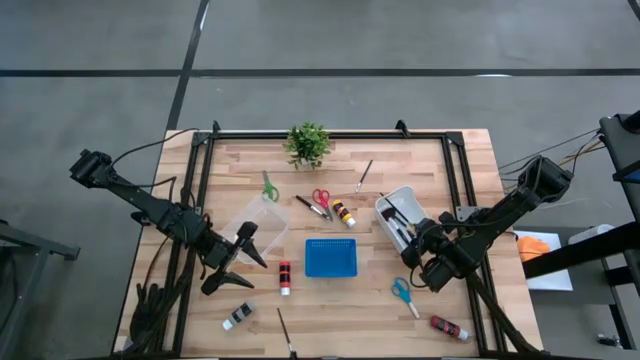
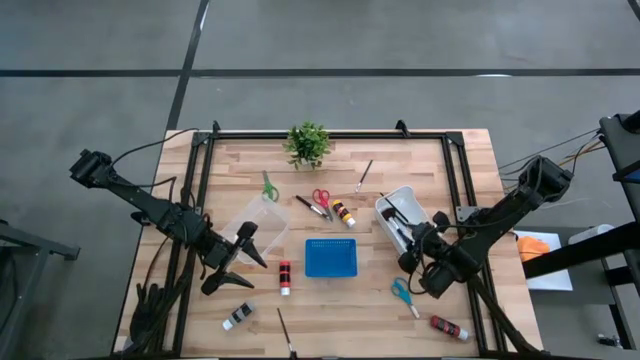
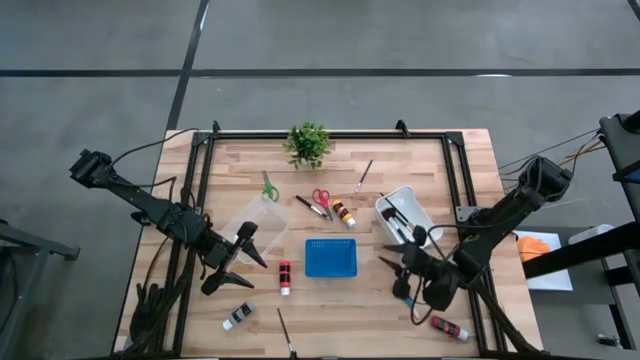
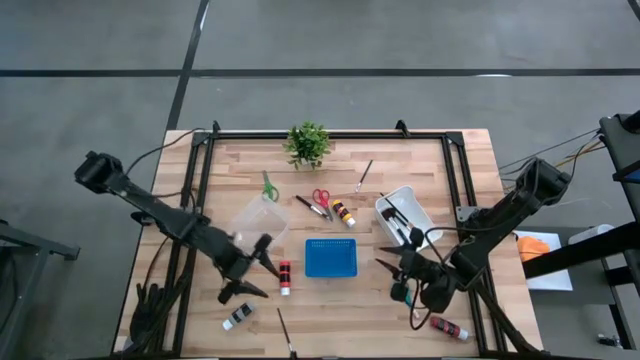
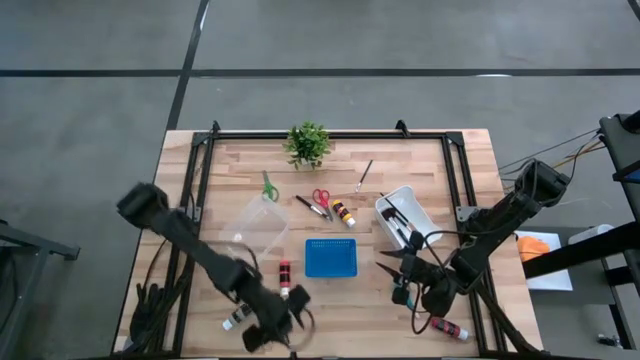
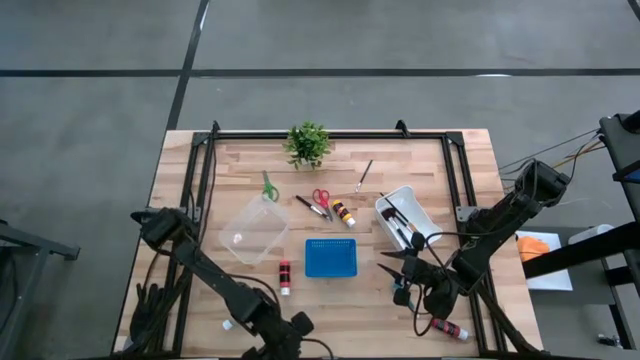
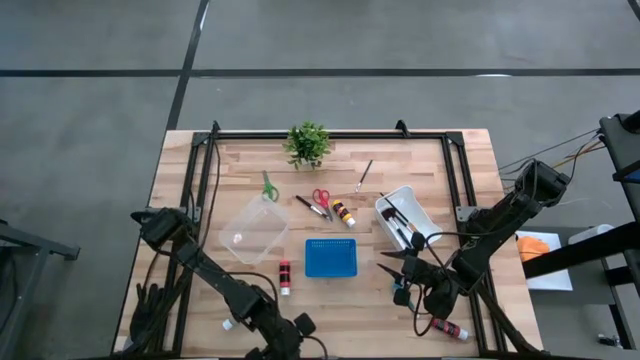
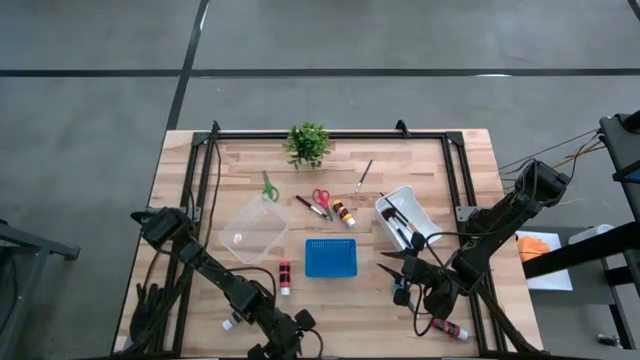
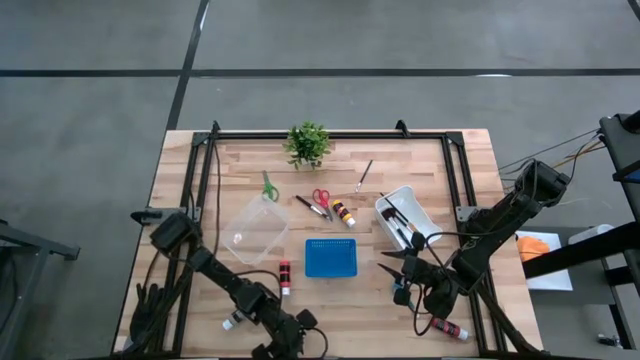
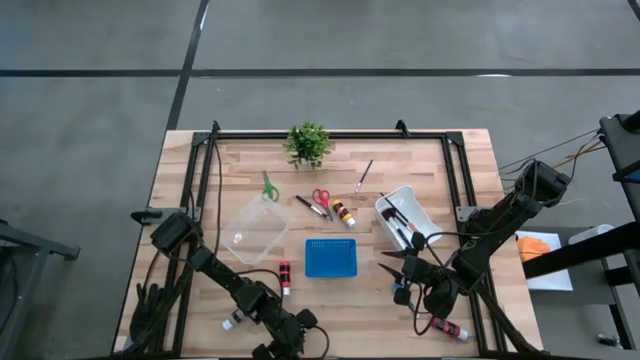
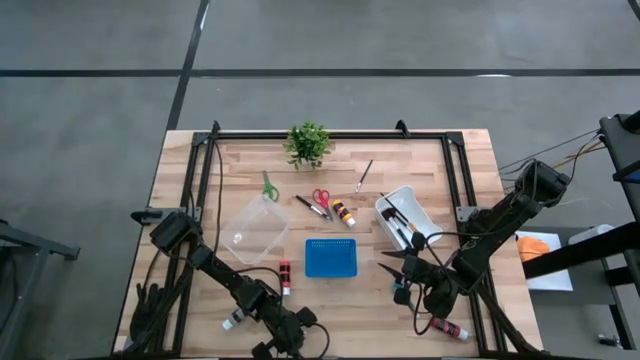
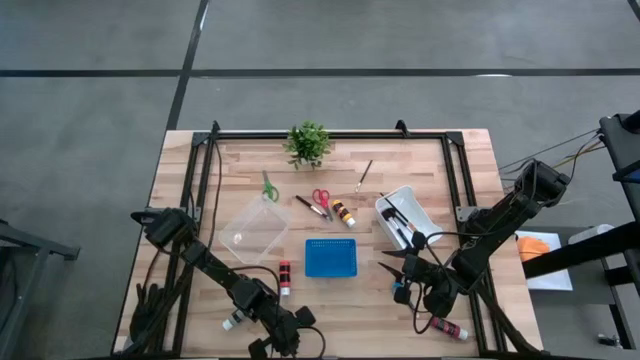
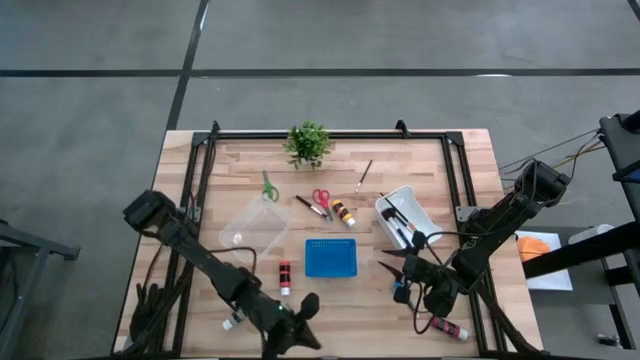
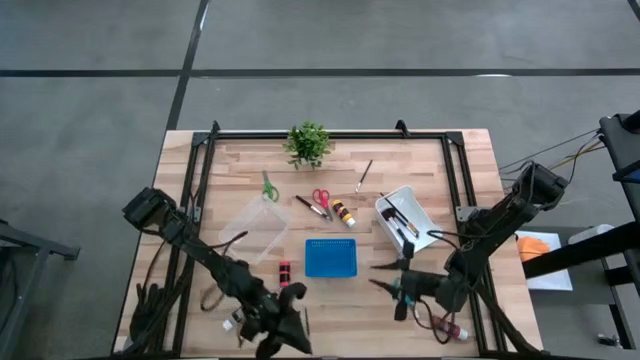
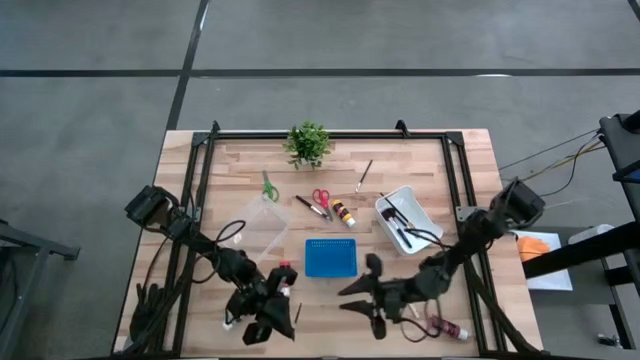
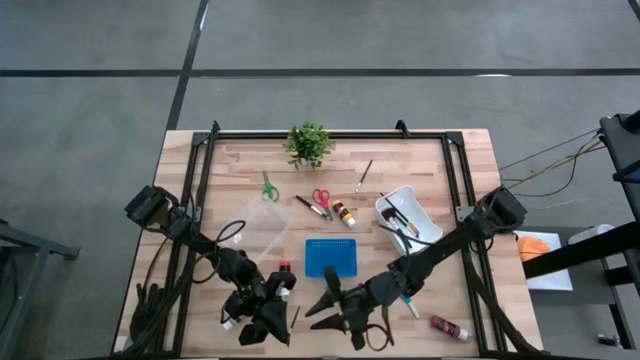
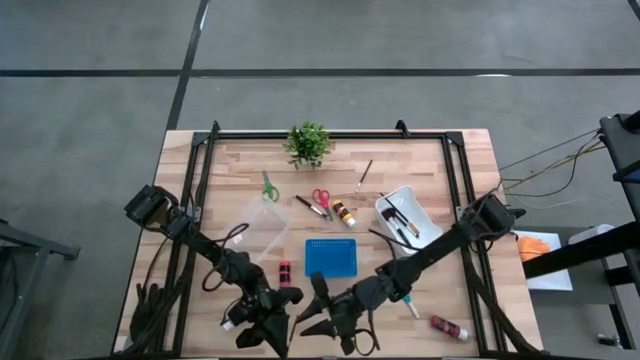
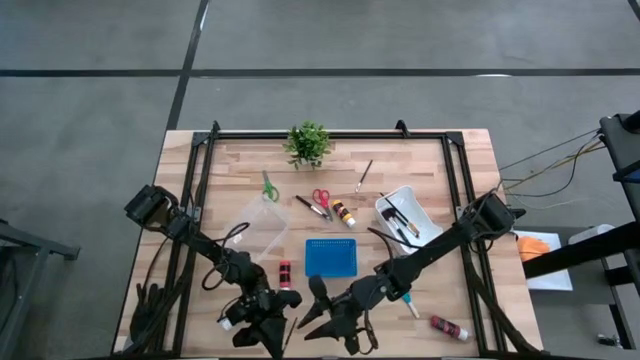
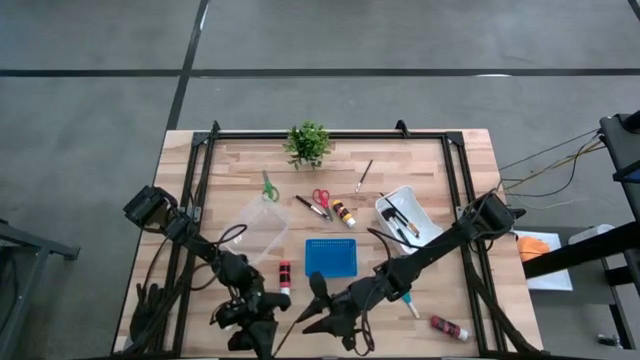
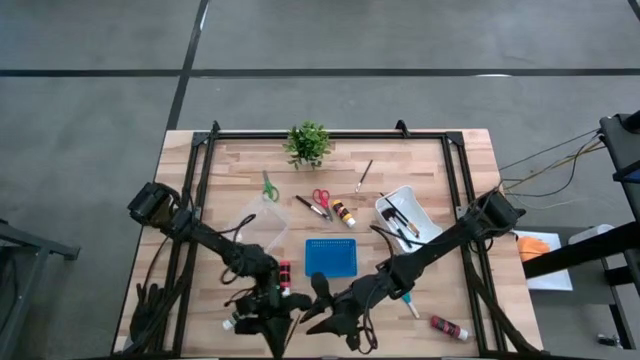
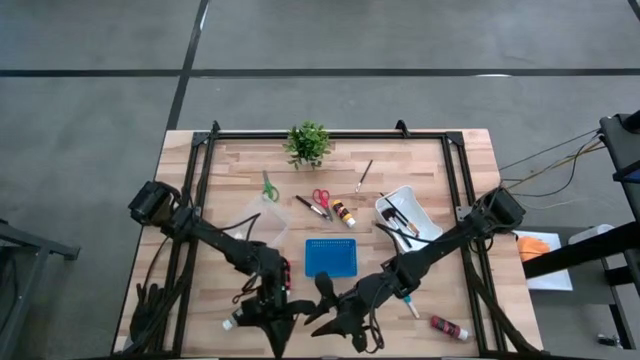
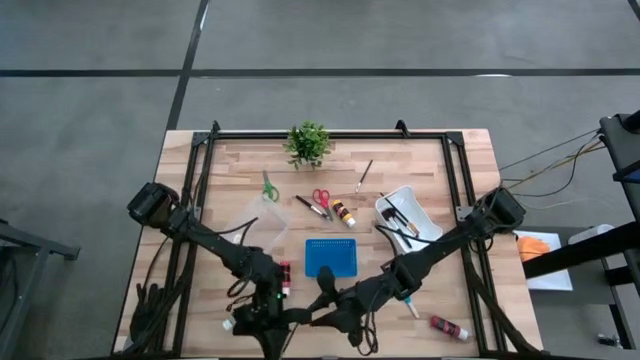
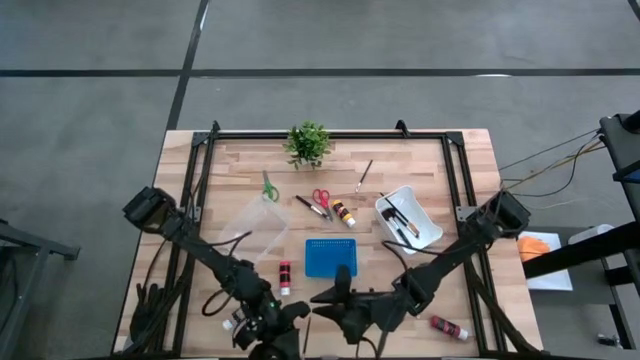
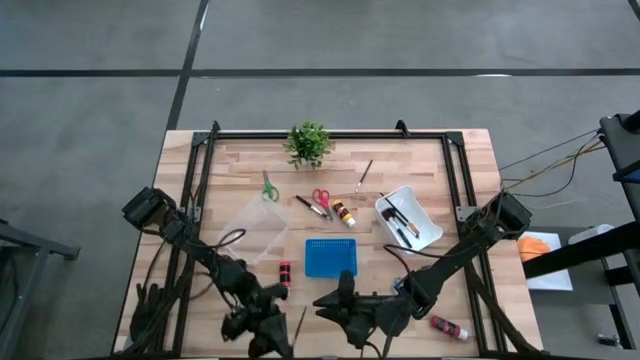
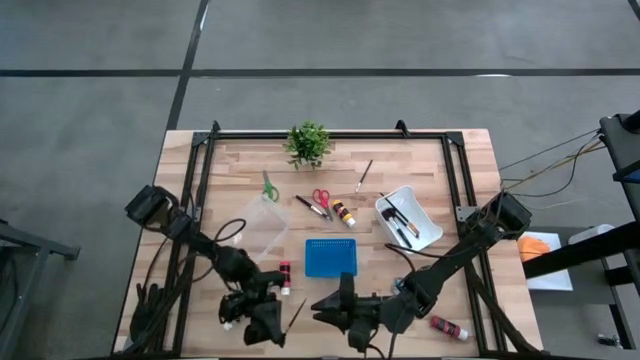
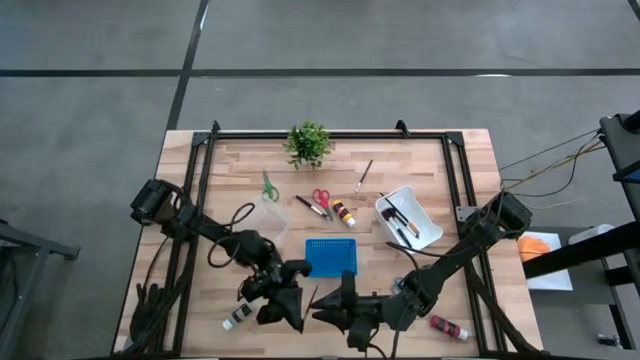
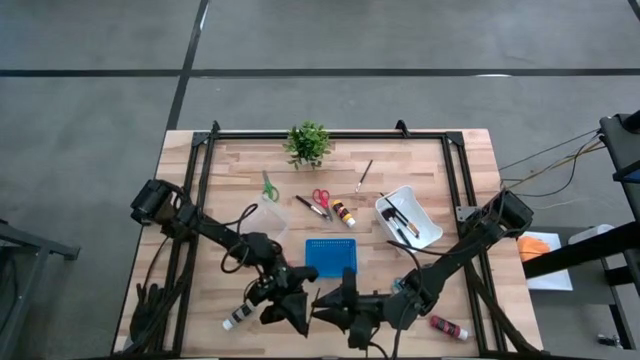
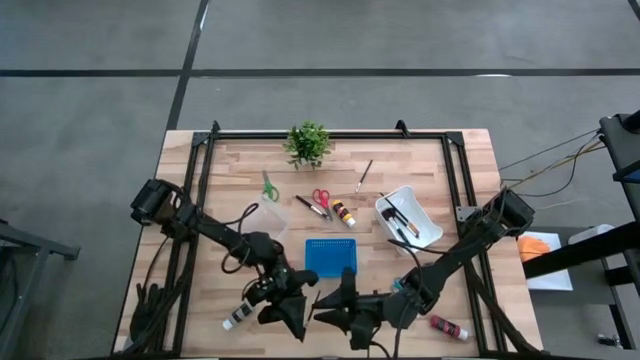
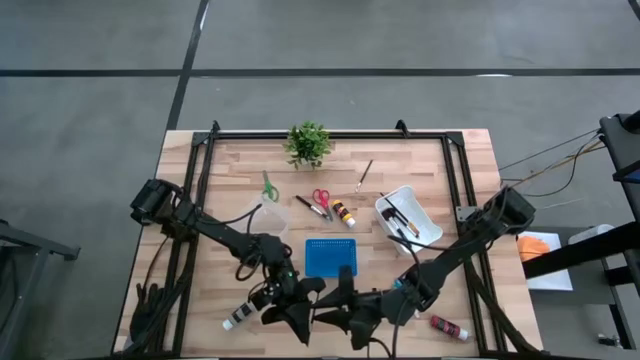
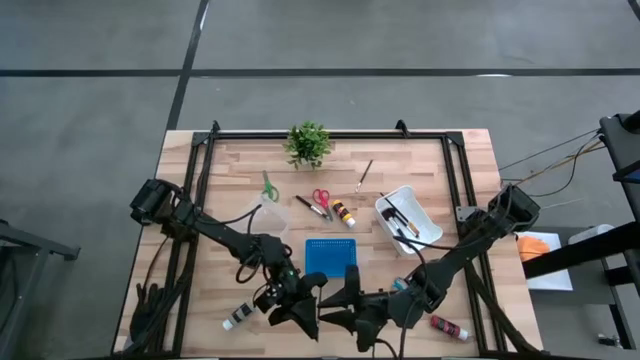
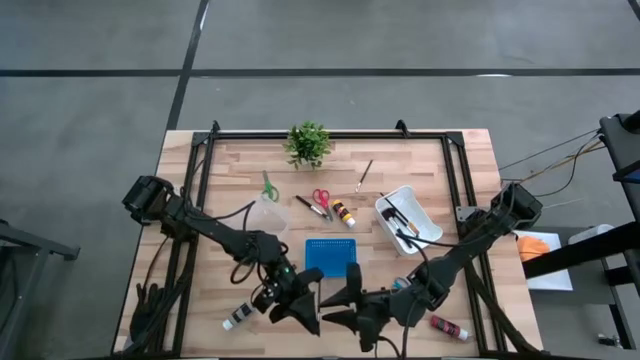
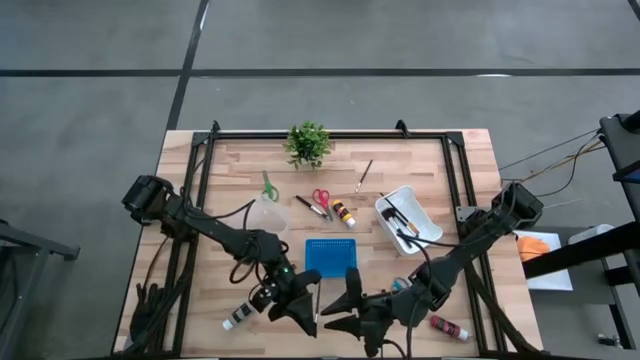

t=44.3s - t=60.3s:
Task: Pick & Place Paint Supplies
Put the eyelash brush in the white bin

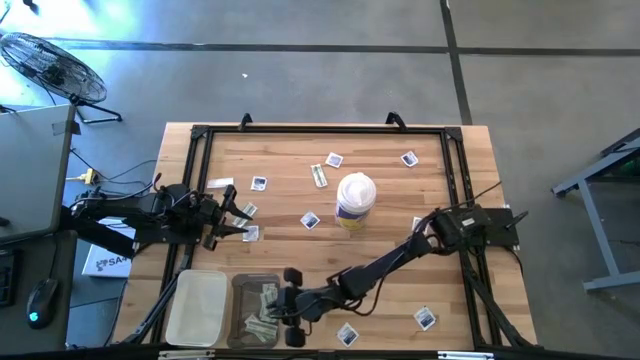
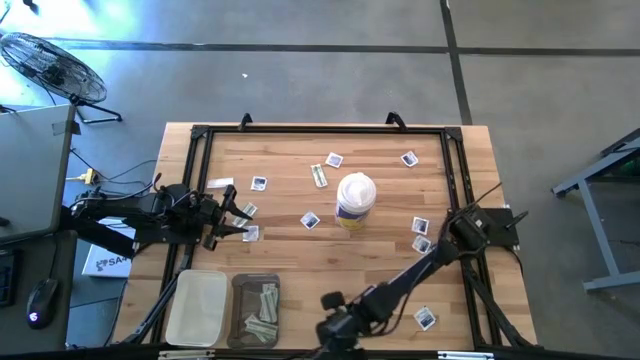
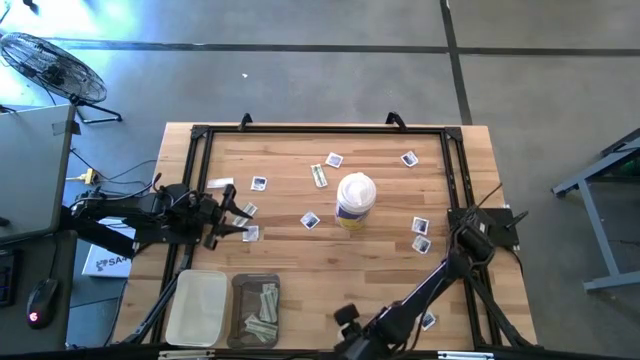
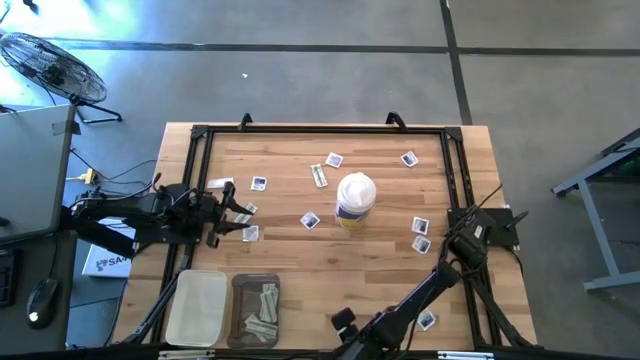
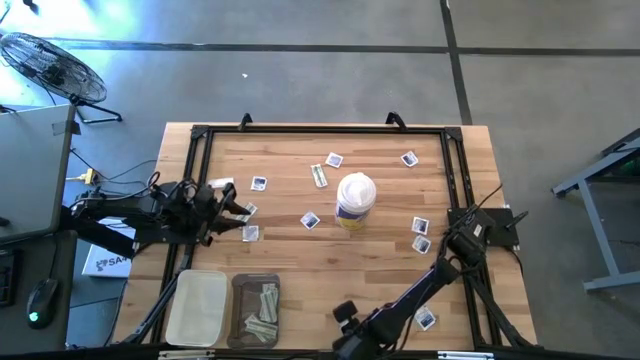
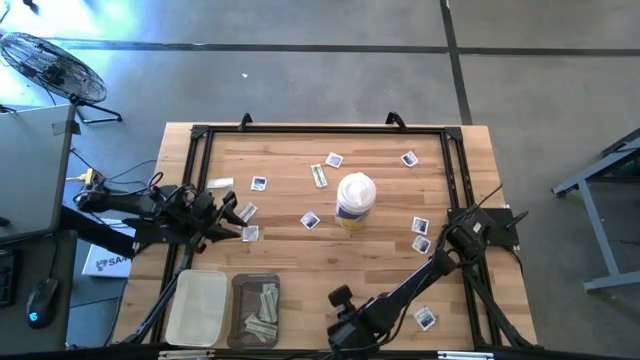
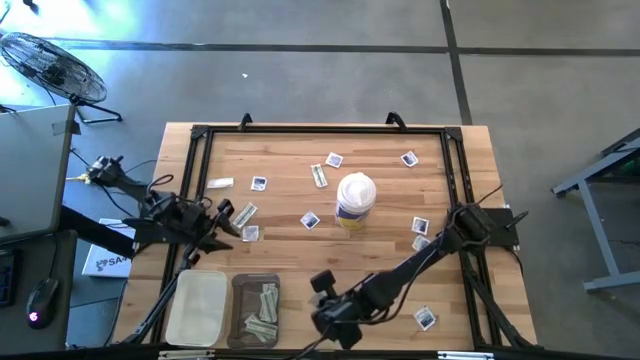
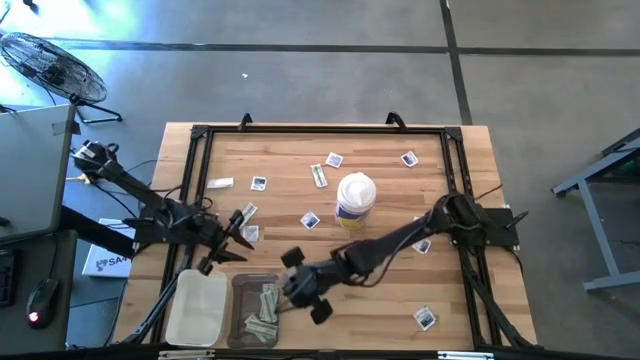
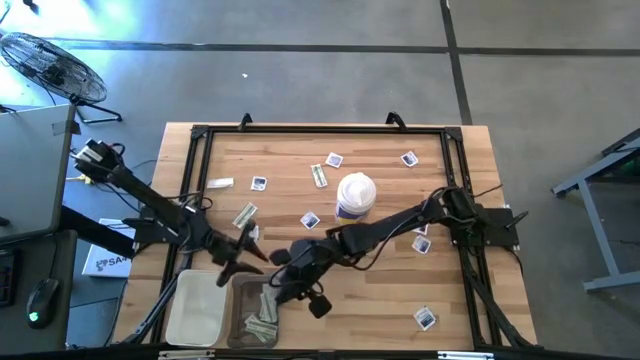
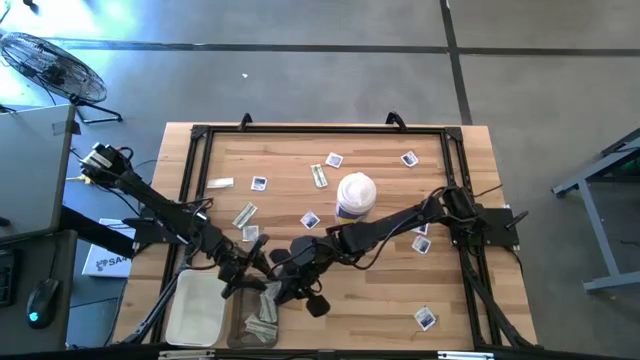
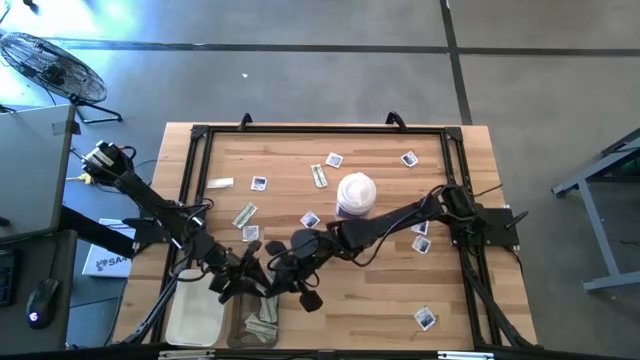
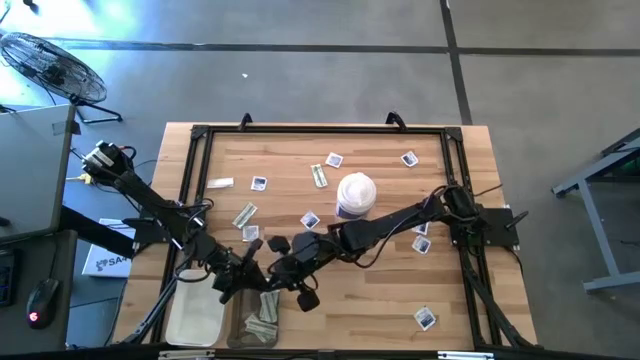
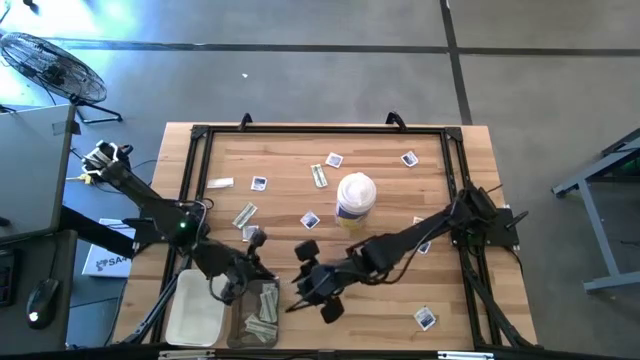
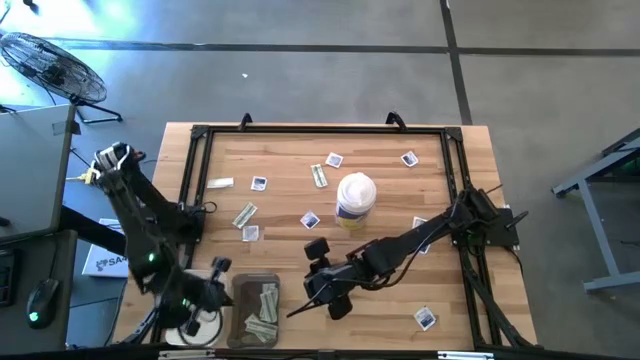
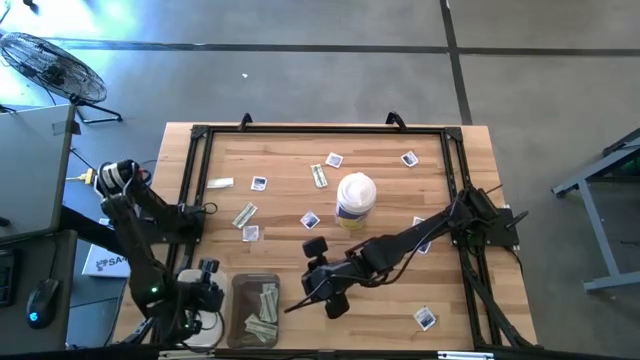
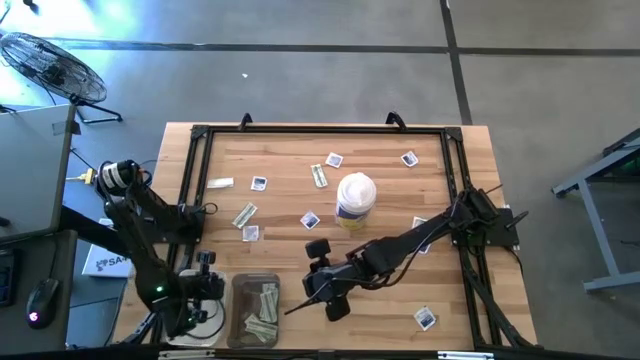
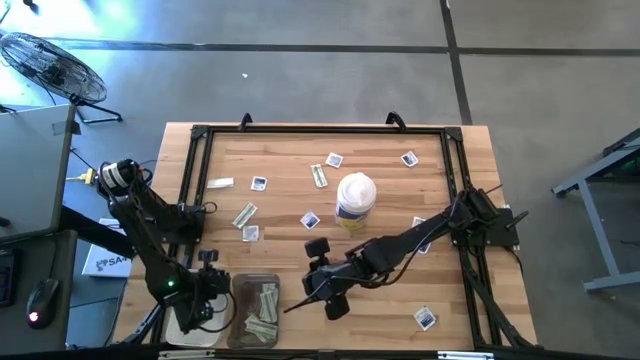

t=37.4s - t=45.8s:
Task: Pick & Place First Aid Supplies
Put the alcohol pad into the white bin
